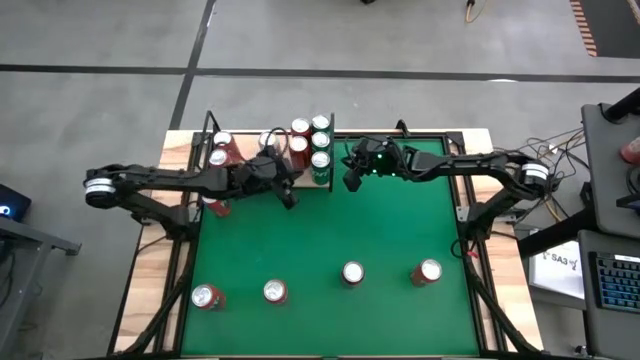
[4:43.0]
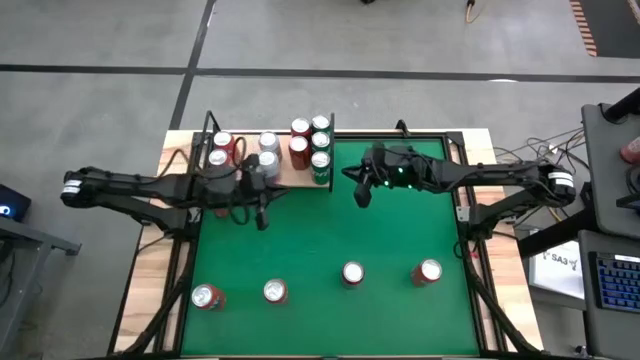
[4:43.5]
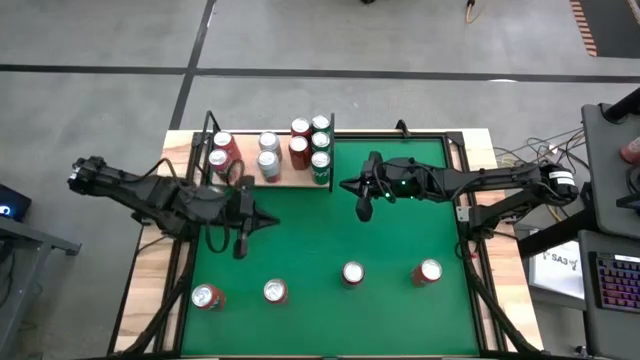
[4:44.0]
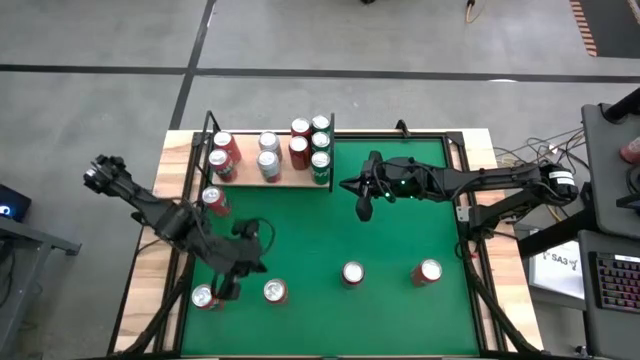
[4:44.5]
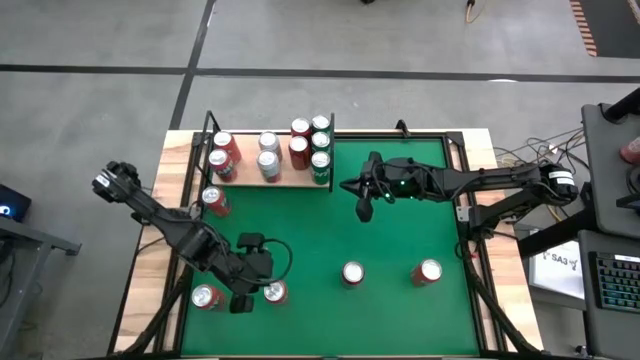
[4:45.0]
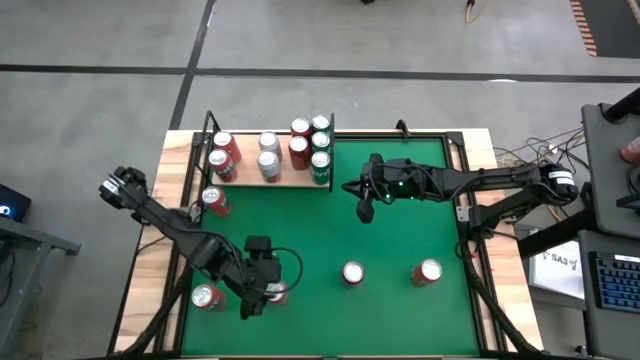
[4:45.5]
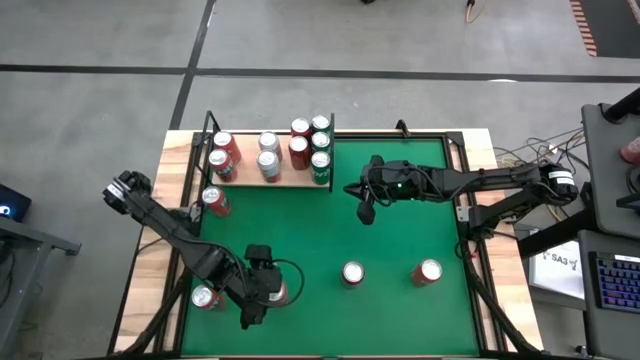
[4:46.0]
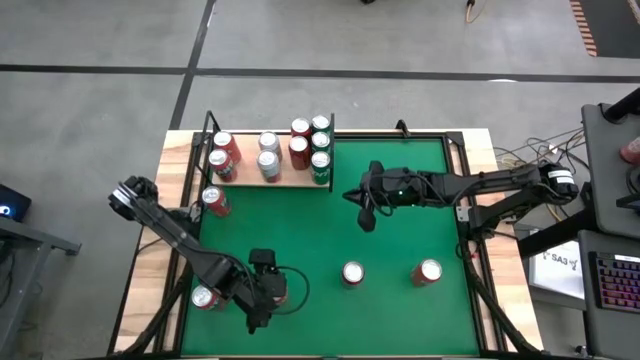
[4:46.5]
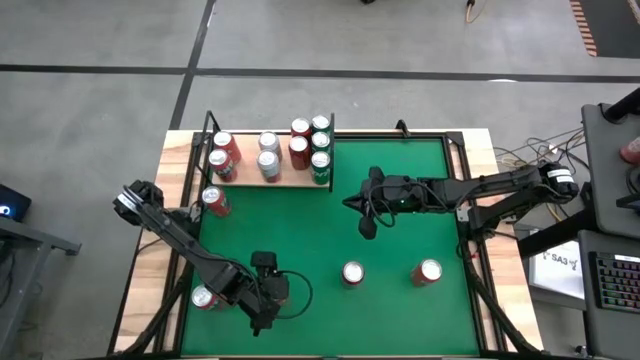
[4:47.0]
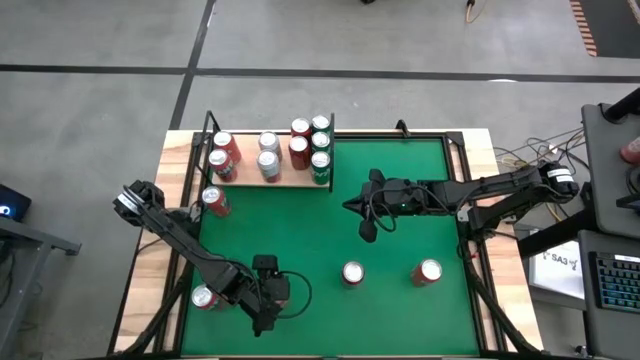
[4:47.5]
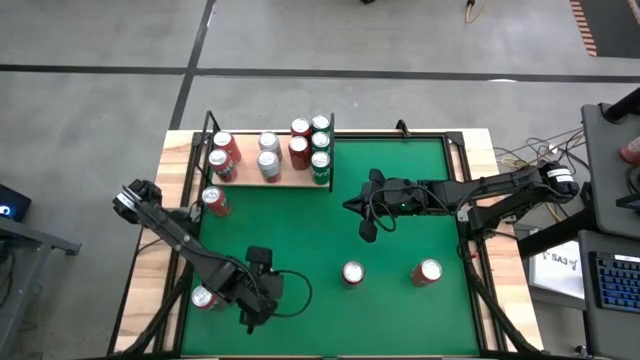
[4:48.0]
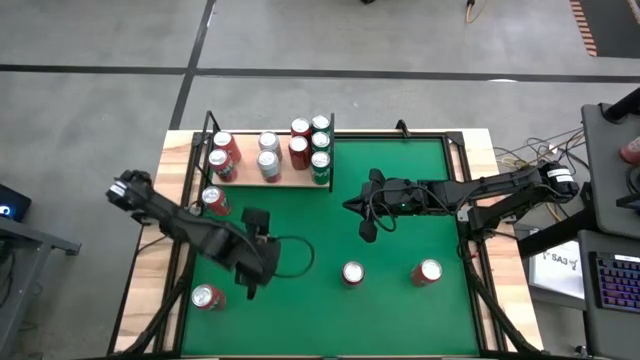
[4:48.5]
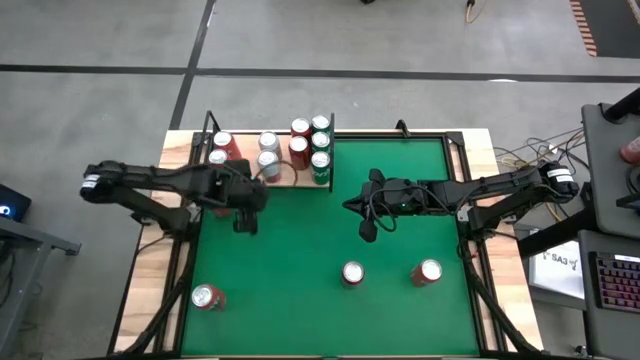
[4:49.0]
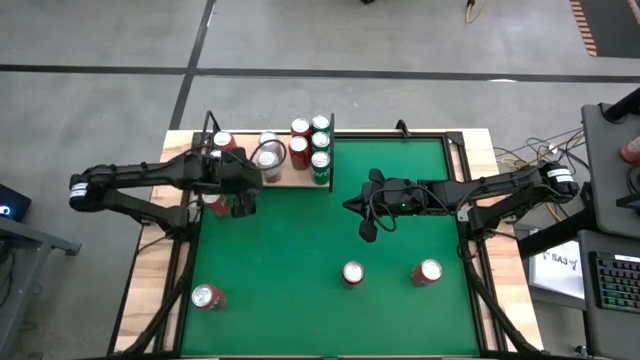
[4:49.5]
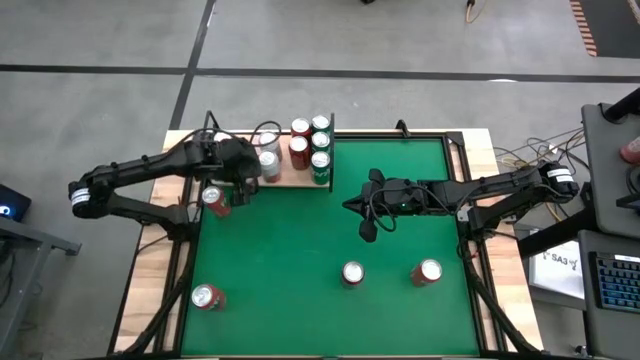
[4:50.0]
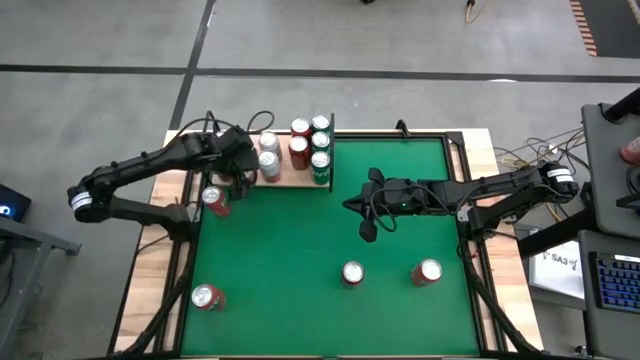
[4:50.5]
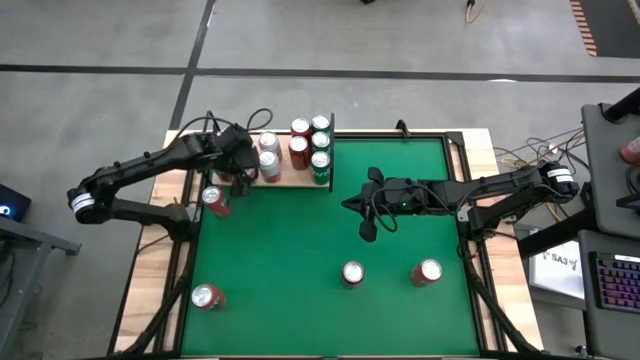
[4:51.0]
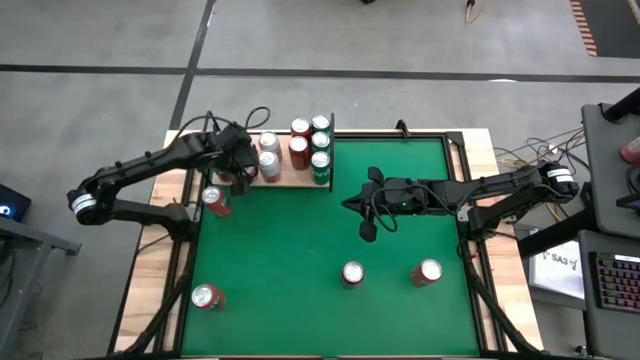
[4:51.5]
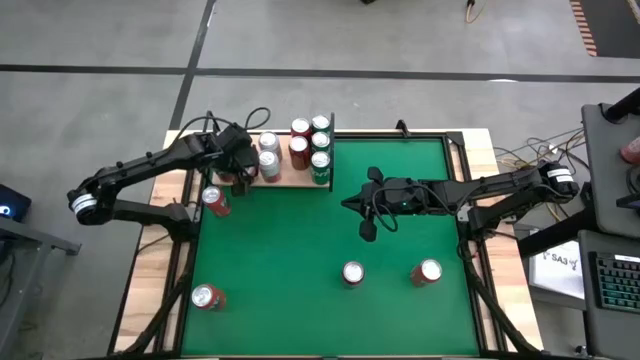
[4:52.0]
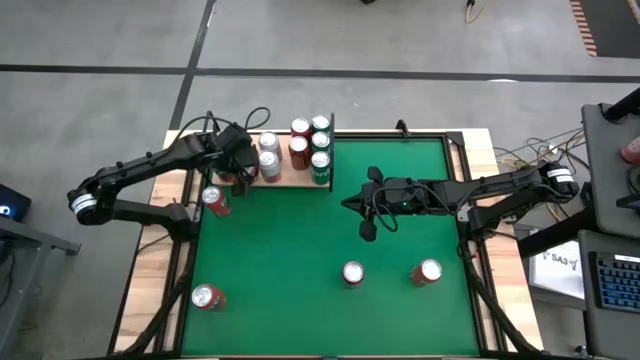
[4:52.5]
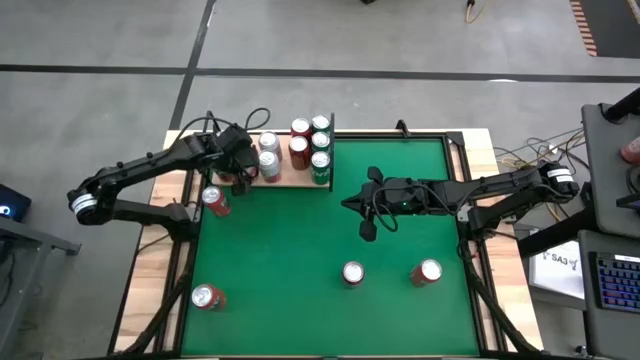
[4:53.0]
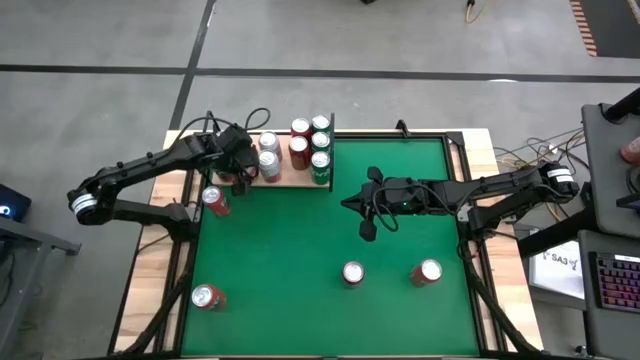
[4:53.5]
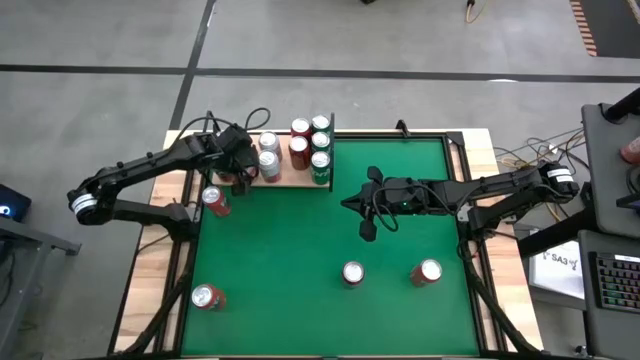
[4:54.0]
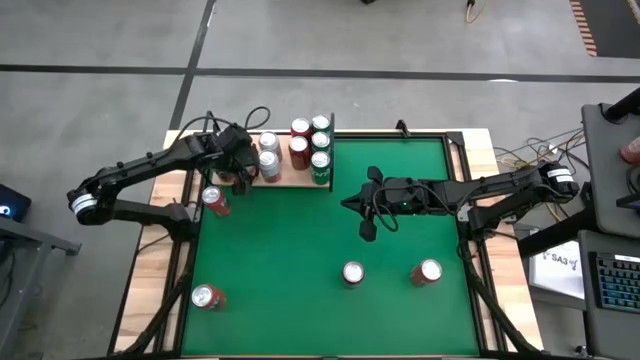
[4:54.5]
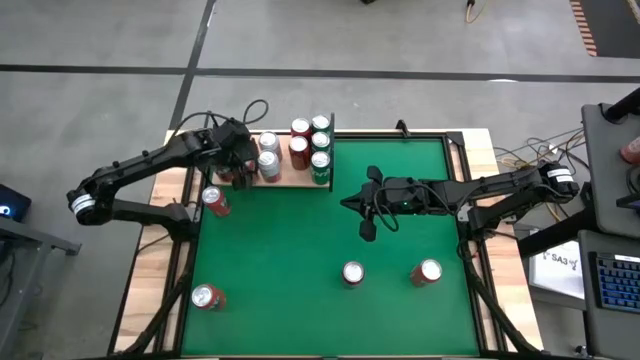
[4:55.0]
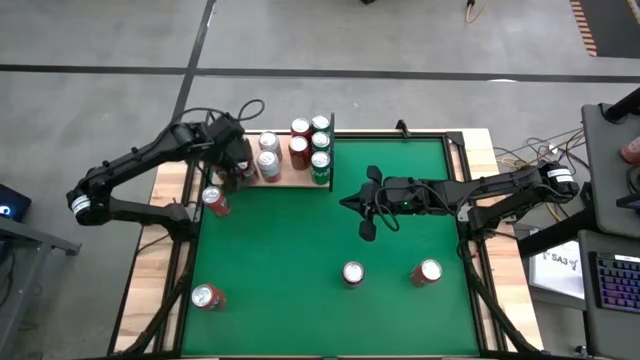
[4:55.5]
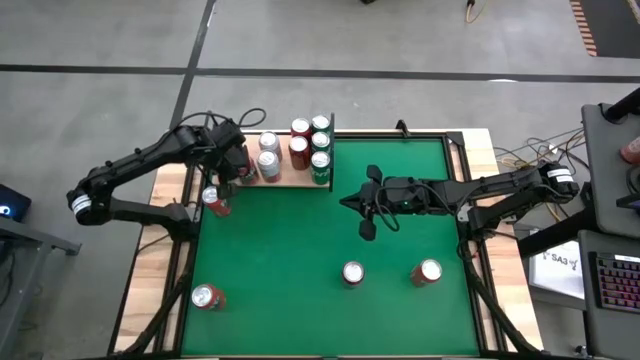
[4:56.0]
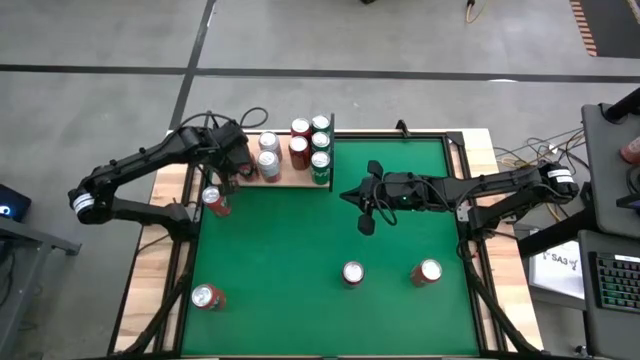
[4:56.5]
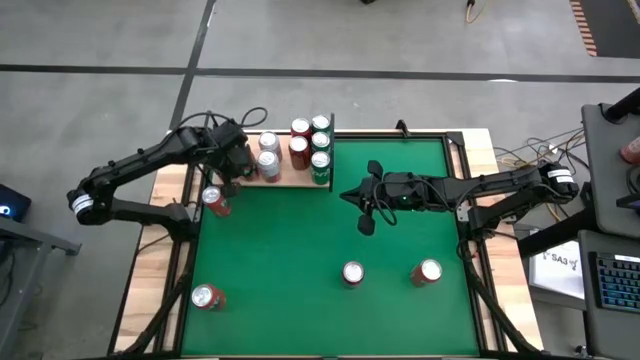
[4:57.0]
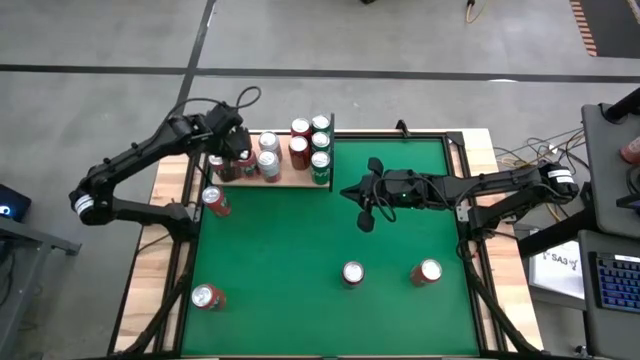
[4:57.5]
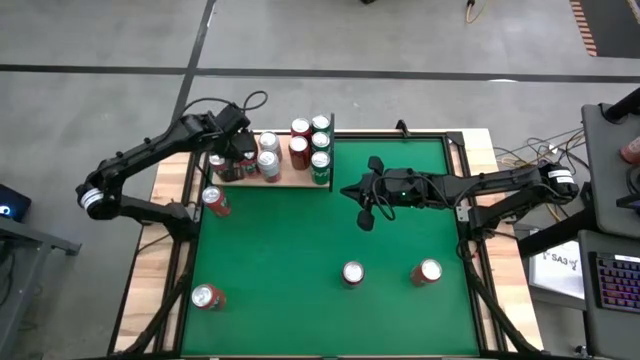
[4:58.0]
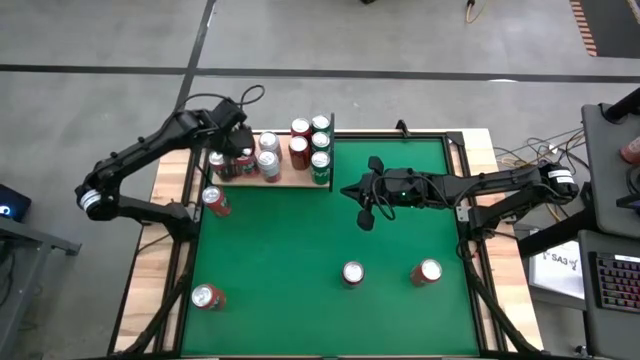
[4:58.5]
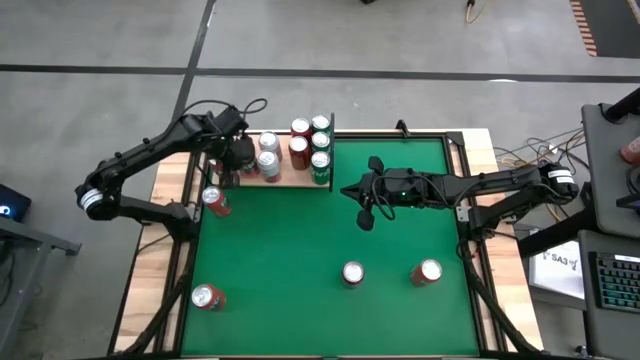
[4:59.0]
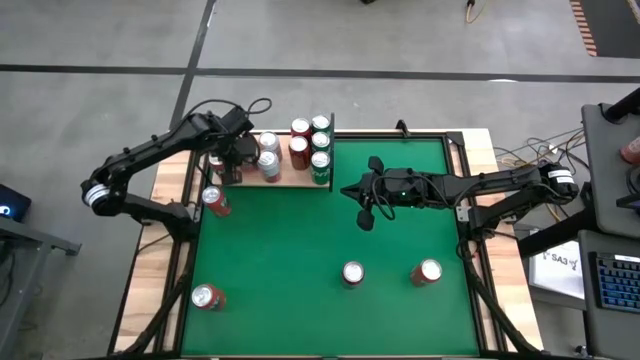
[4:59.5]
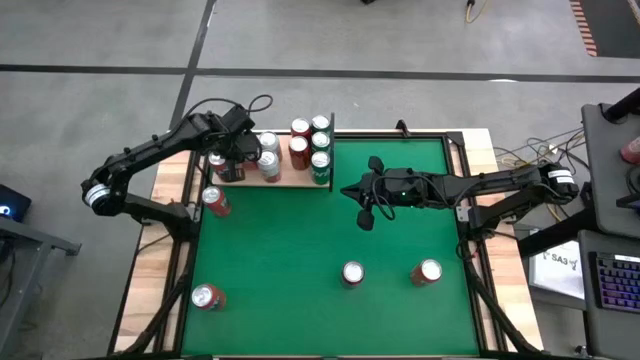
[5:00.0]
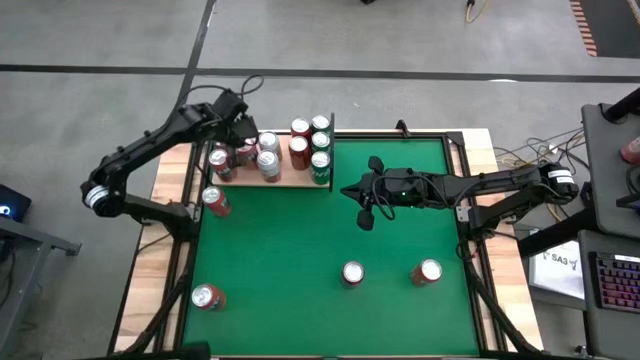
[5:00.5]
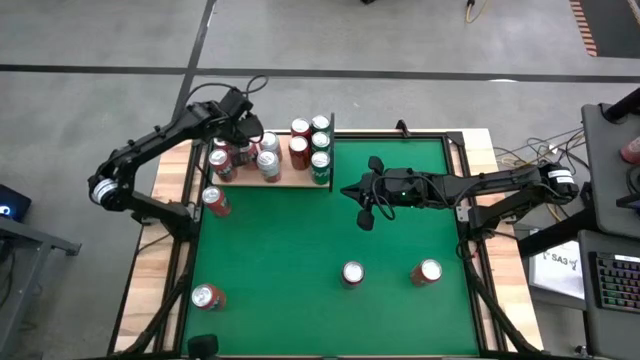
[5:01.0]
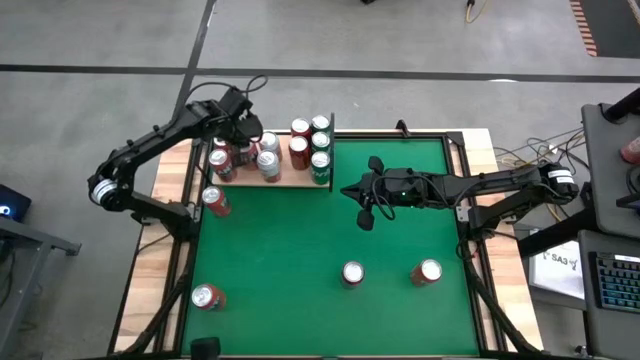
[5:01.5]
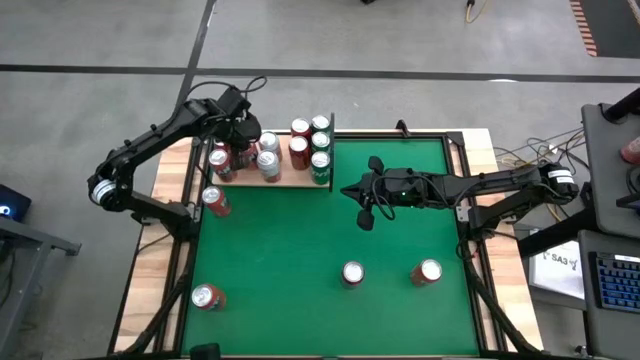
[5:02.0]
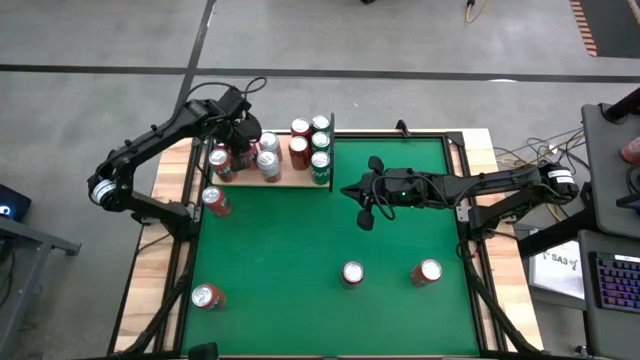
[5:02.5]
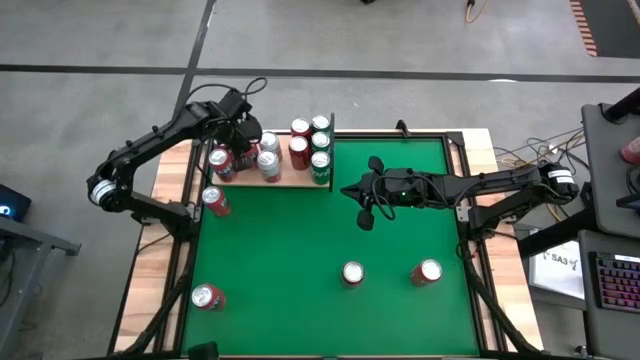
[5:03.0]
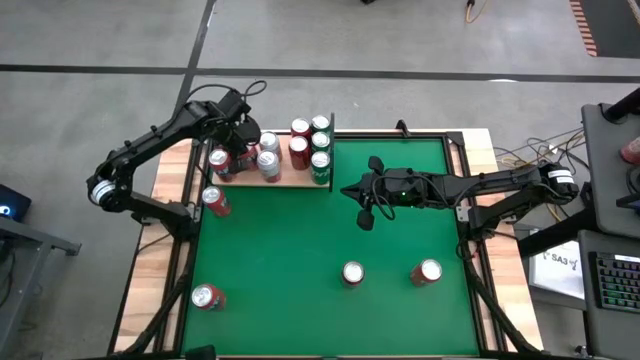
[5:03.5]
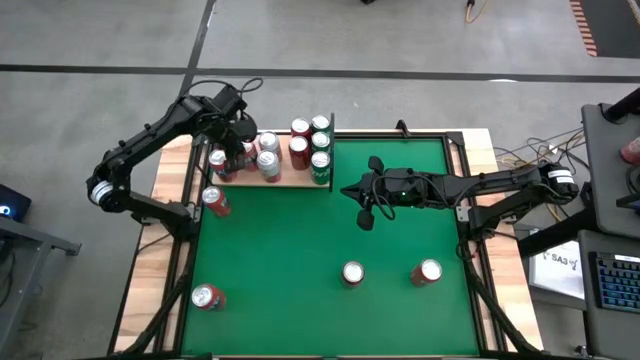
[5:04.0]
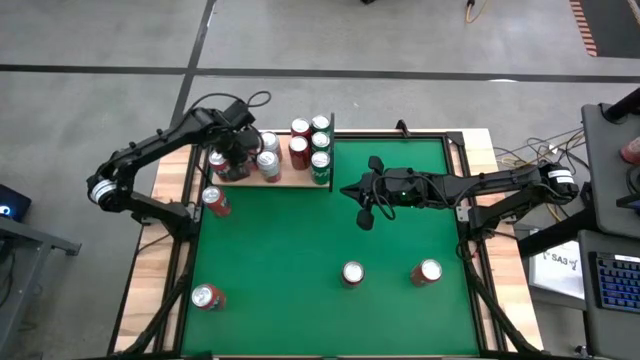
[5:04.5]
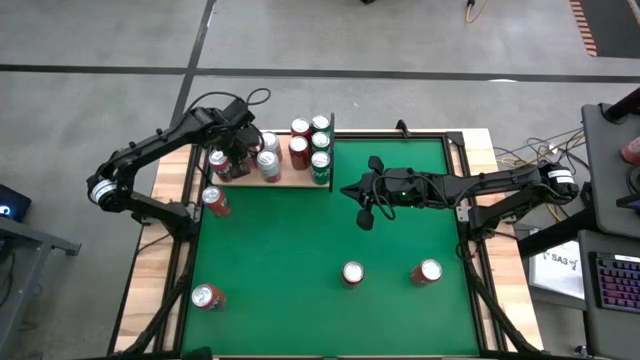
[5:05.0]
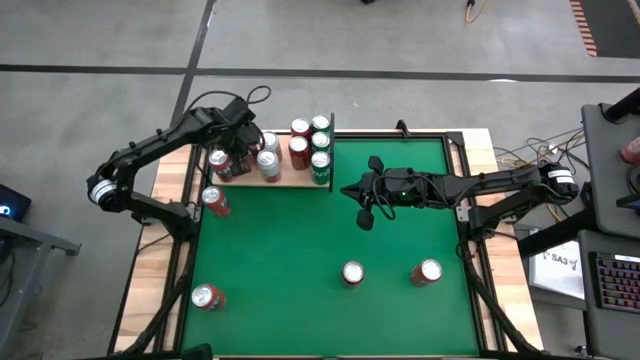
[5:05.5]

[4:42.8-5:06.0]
Task: Place canned beverage on shelf
Put the red soda can on the shelf aligned with the other red soda can
